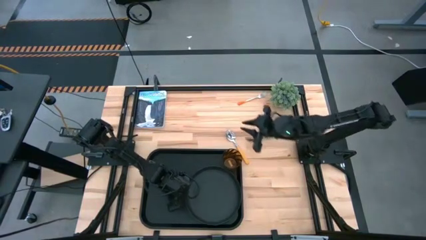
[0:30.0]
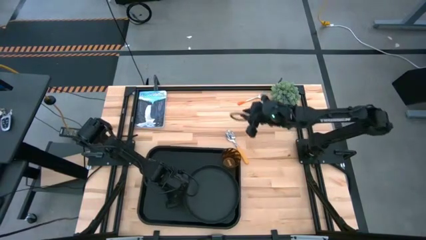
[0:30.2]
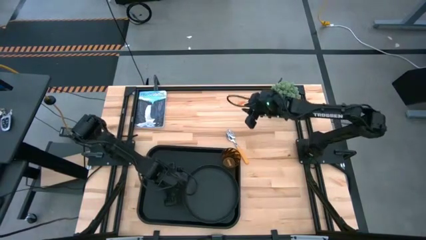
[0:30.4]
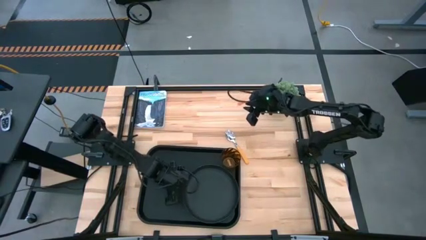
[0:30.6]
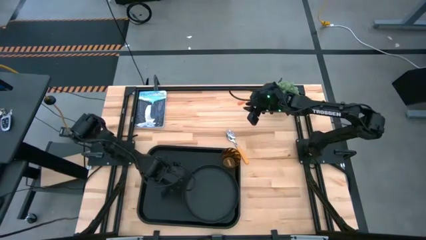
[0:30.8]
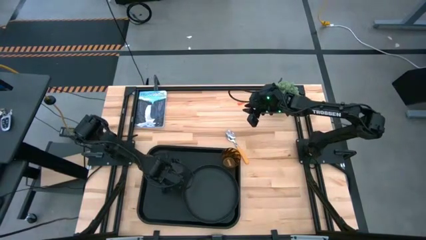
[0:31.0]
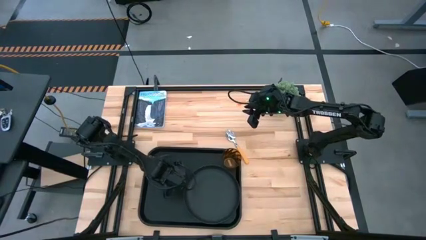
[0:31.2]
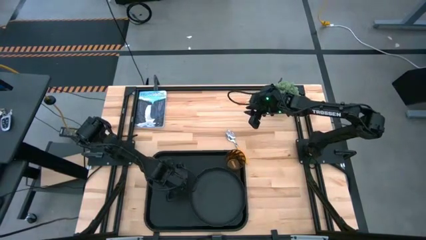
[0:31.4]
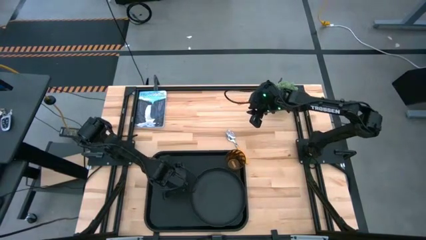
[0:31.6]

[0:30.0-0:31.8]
Task: Pick and place plate/cup/fork/spoon on tray
Adjust the black tray

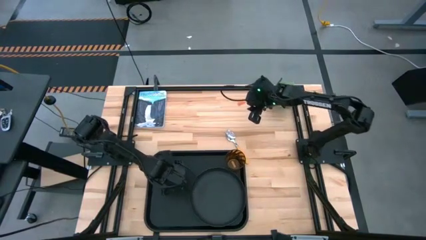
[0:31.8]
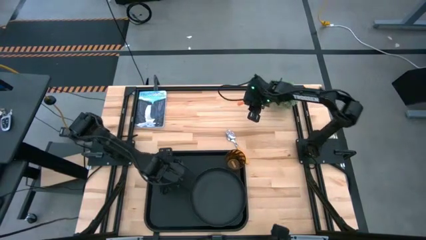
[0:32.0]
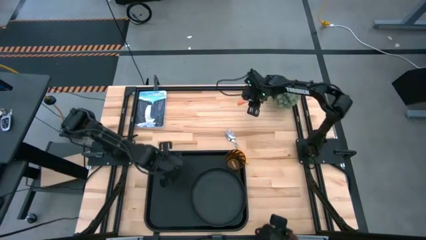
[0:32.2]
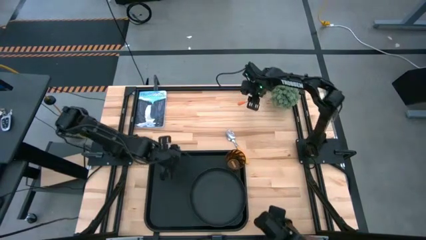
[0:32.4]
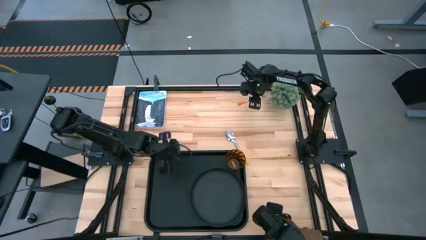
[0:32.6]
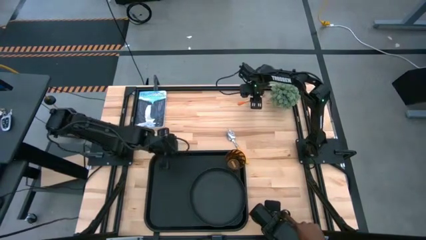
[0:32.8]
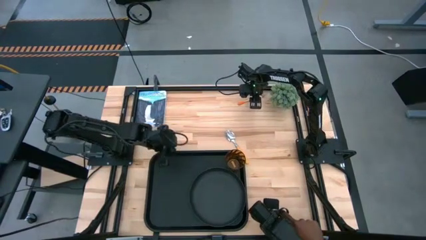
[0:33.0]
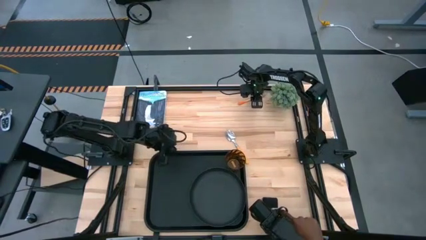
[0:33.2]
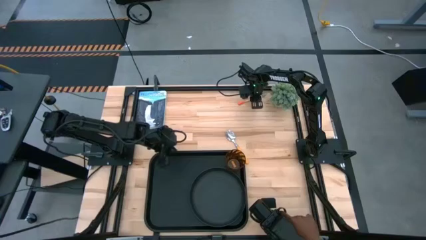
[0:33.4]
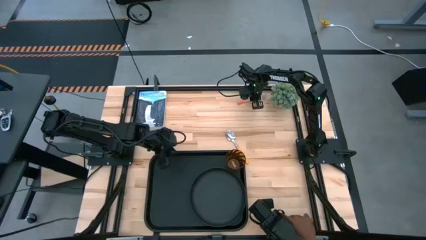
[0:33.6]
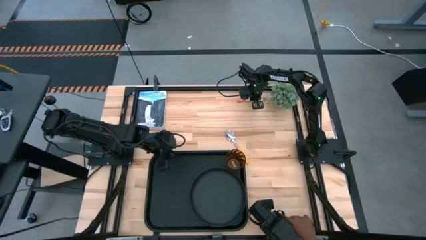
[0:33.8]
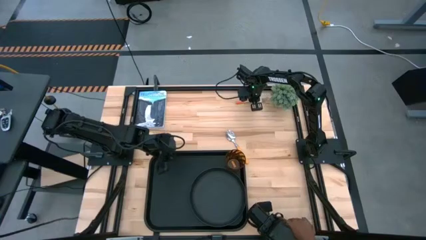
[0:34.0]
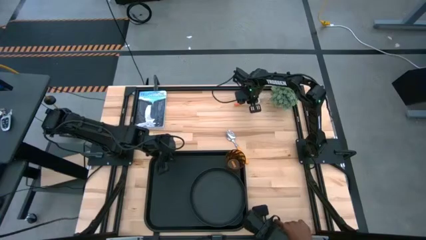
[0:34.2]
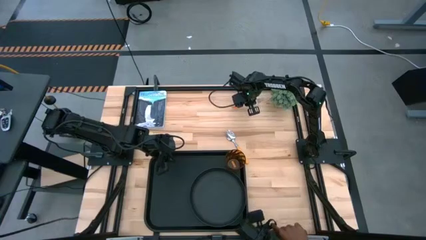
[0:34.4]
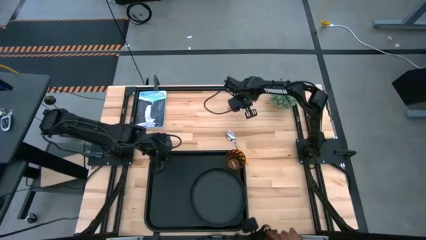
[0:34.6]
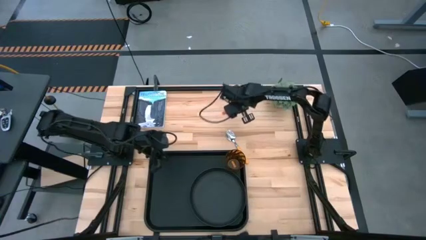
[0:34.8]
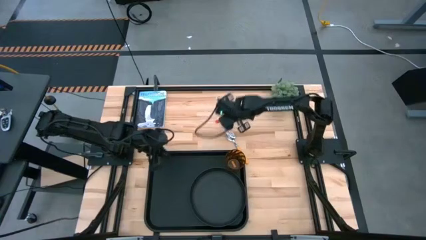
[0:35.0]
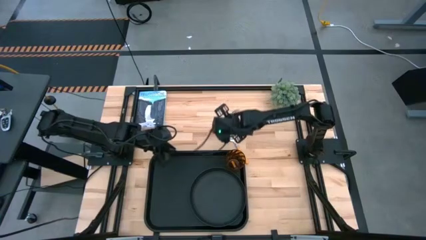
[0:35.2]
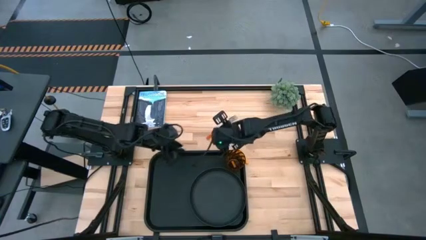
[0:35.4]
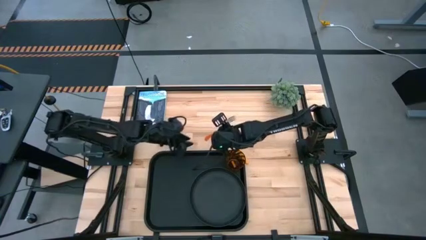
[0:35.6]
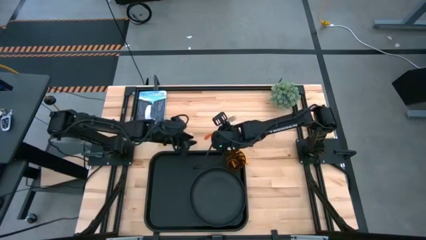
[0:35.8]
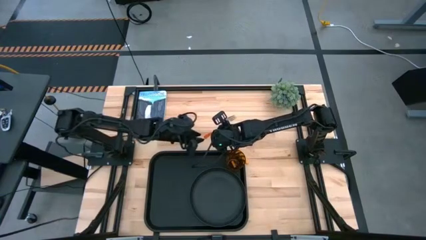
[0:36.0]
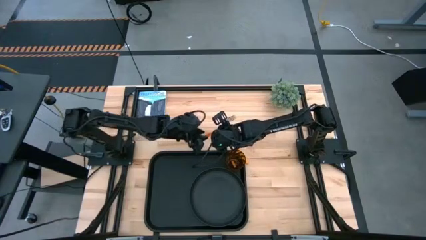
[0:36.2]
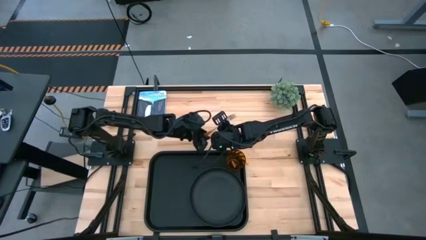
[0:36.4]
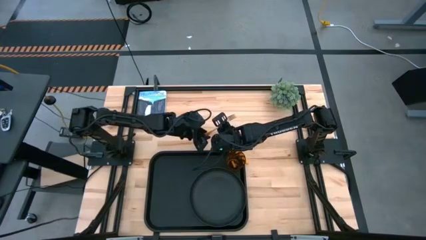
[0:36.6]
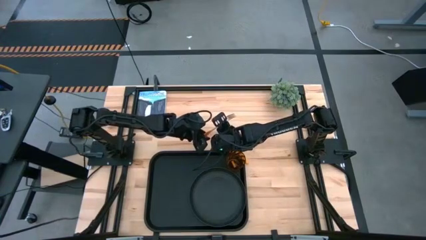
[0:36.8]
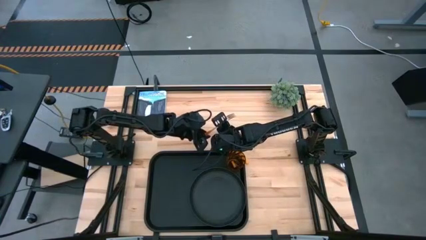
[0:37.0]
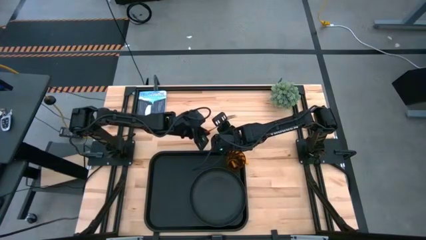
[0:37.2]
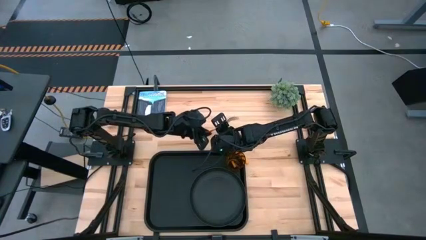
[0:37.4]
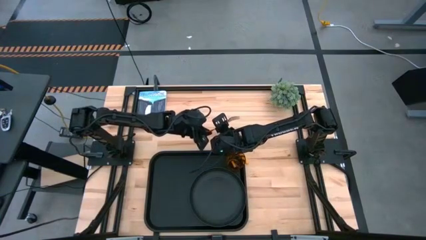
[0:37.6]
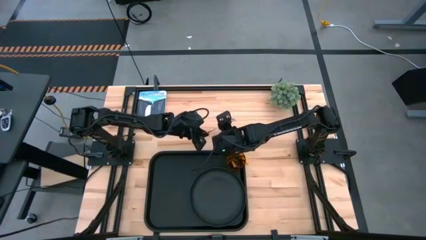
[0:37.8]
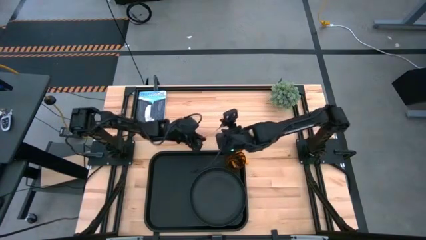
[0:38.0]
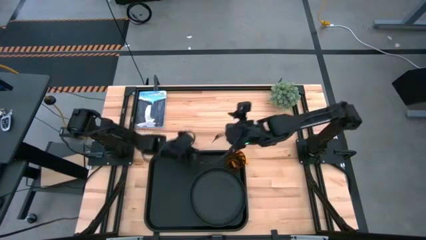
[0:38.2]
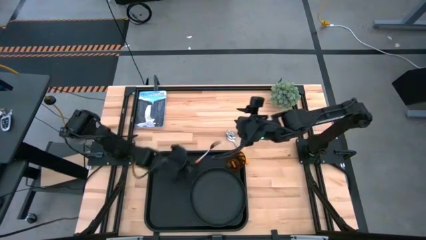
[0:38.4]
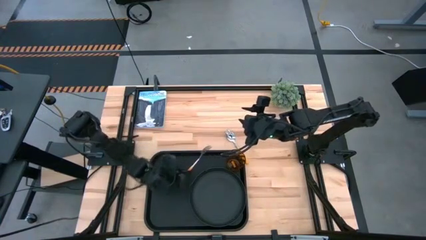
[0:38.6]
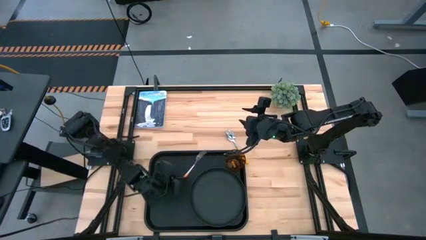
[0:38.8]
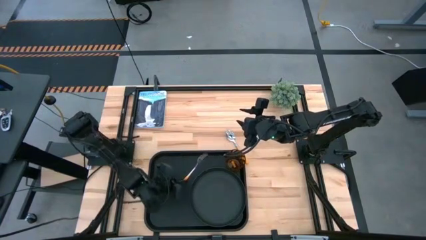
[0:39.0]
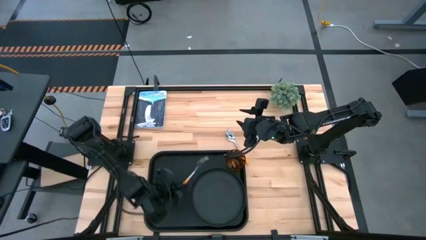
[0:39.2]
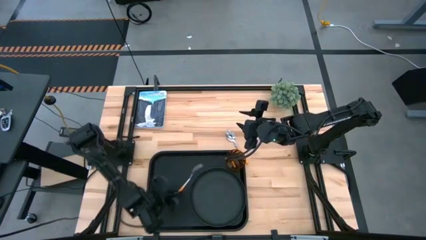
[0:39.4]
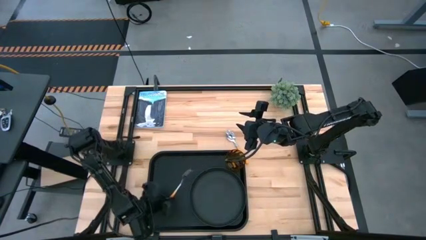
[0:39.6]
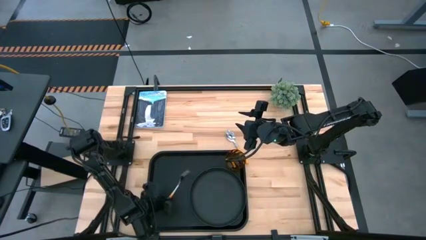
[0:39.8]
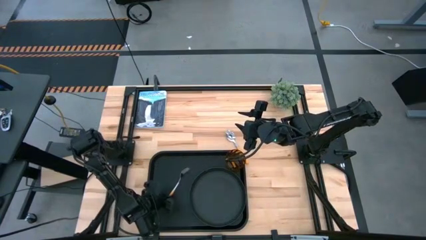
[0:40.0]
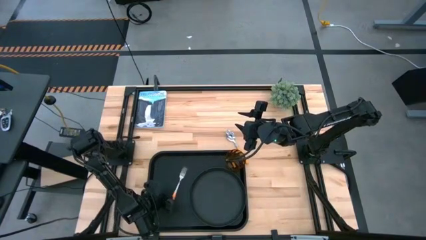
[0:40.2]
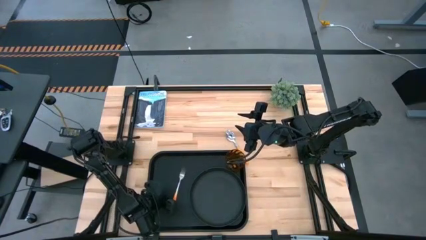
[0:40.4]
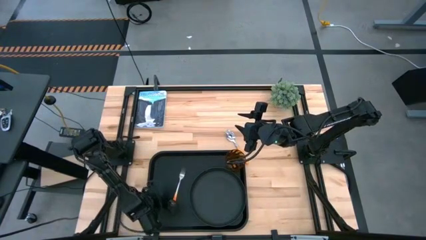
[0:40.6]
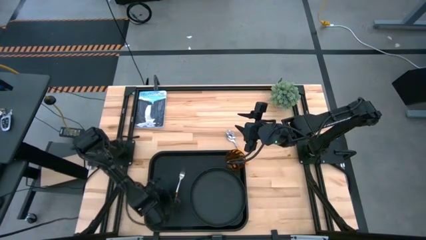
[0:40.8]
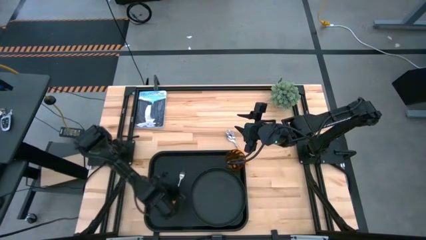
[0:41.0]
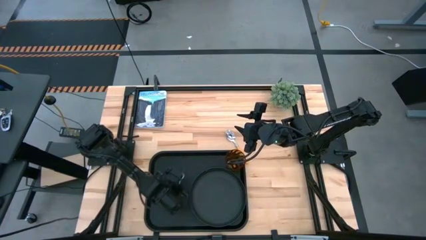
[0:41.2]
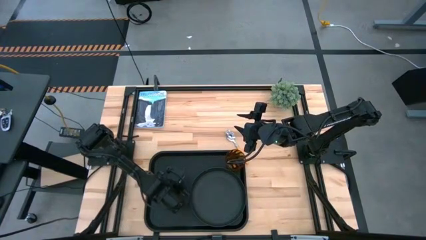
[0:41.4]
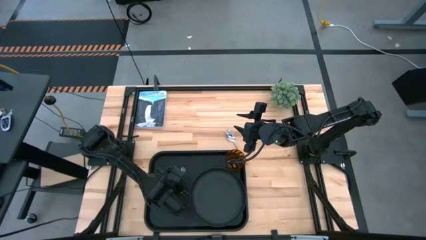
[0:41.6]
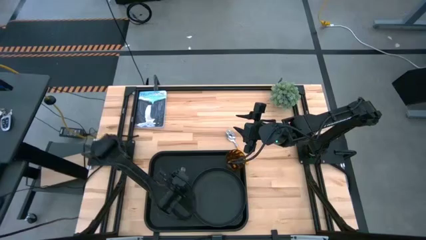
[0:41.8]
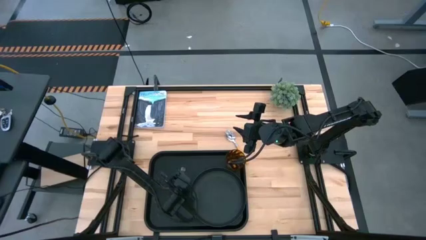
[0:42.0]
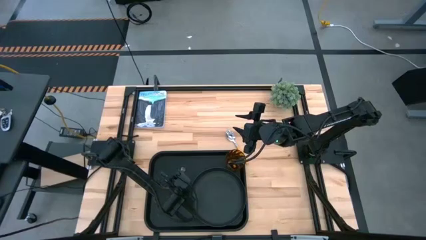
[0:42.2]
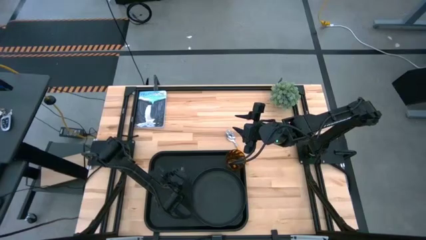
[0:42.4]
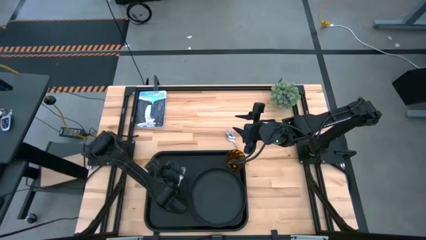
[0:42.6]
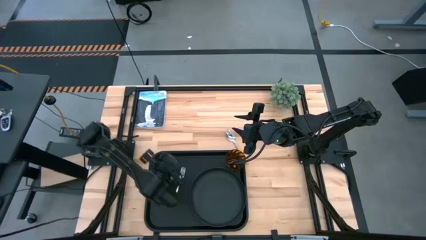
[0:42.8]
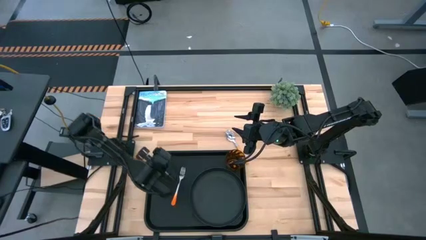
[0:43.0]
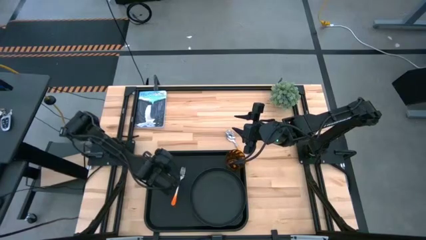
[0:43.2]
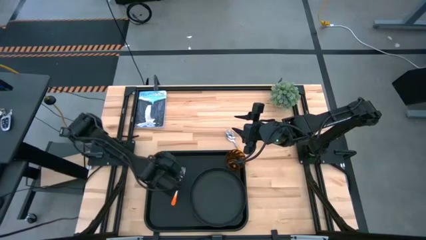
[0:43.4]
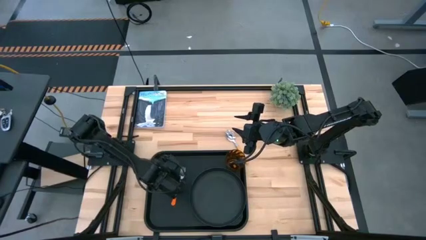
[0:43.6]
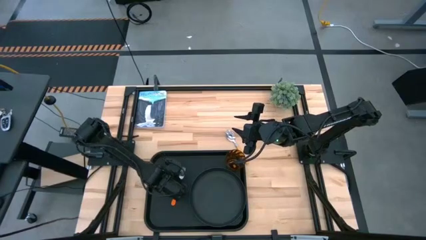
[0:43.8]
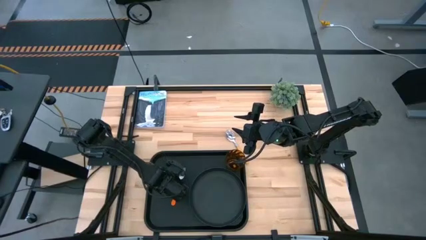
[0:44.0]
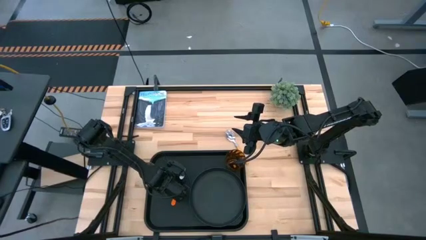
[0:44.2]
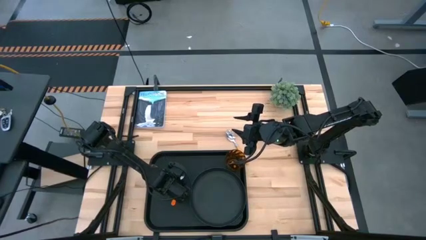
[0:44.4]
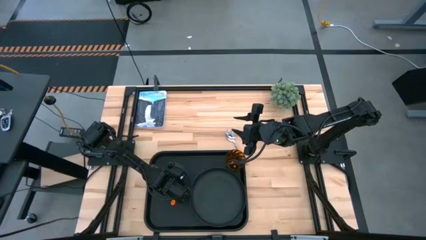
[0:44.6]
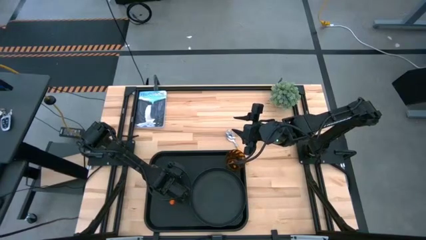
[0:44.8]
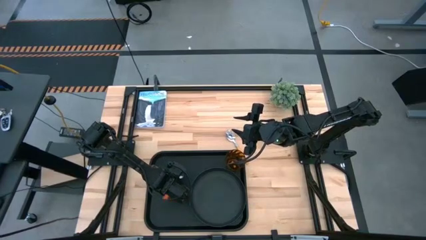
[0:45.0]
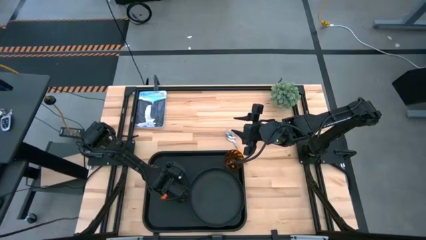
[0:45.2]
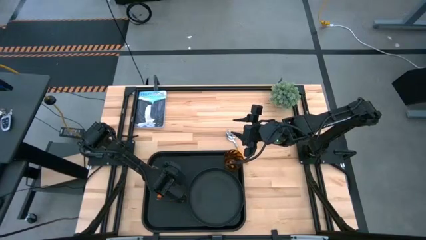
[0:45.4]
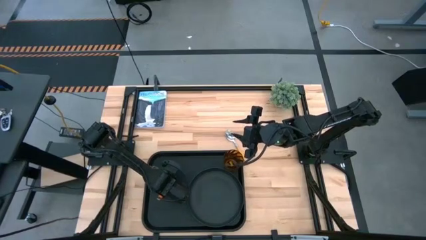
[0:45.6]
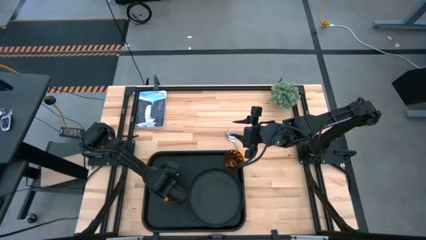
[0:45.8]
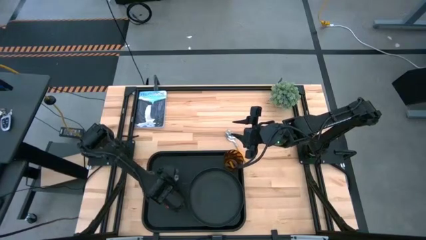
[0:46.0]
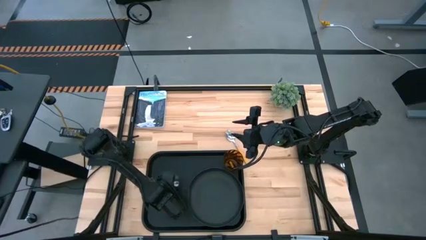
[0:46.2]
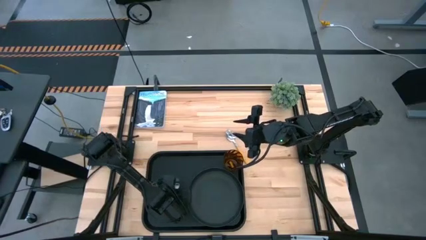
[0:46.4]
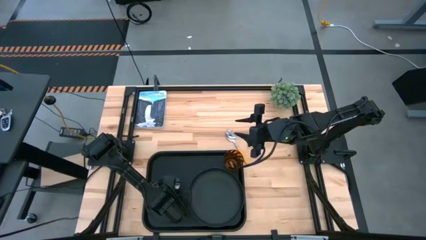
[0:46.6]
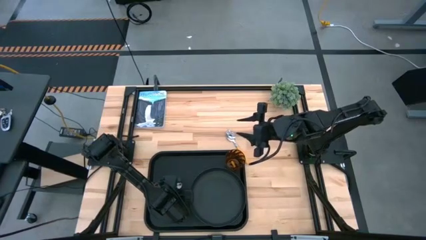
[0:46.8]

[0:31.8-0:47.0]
Put the orange fork on the black tray to the left of the black plate
